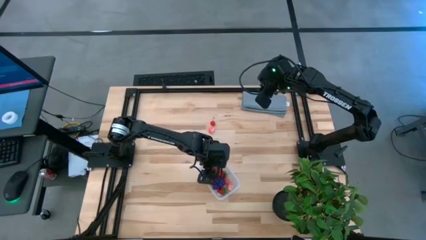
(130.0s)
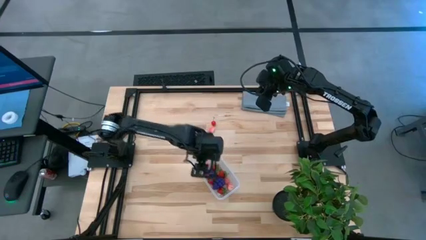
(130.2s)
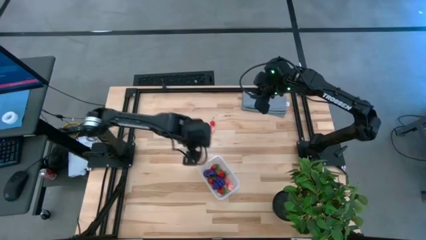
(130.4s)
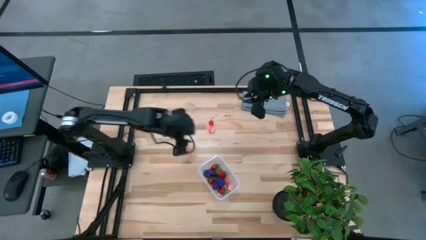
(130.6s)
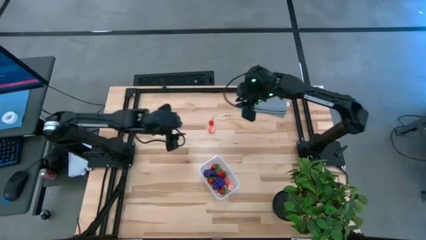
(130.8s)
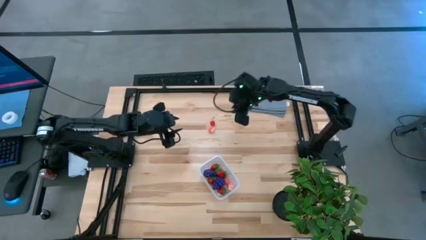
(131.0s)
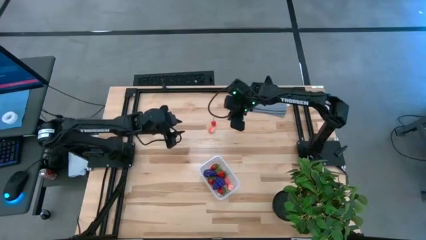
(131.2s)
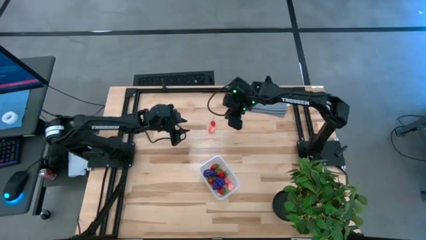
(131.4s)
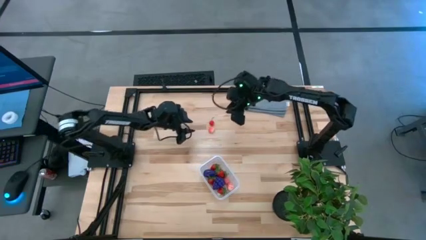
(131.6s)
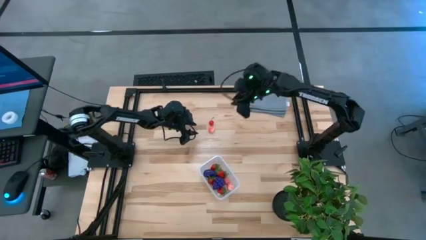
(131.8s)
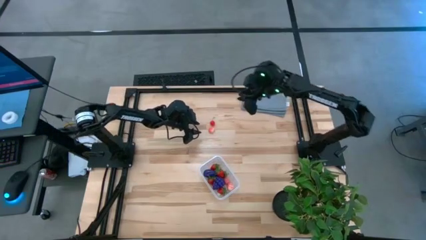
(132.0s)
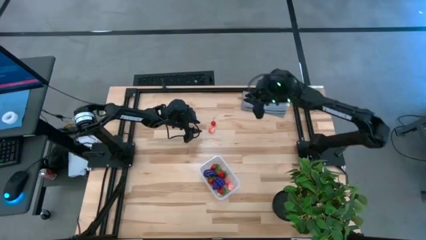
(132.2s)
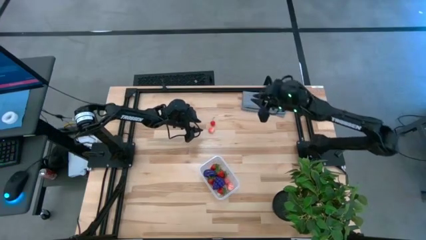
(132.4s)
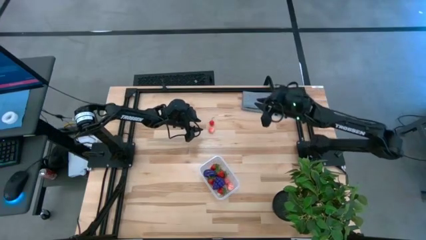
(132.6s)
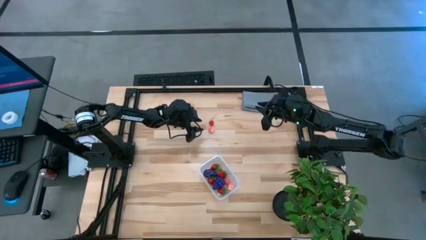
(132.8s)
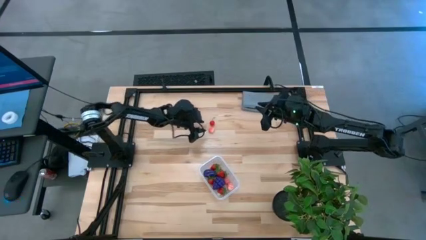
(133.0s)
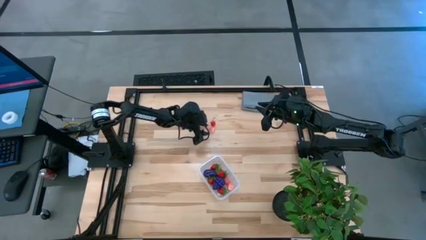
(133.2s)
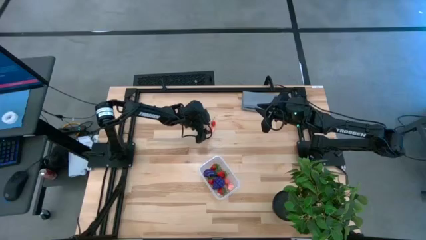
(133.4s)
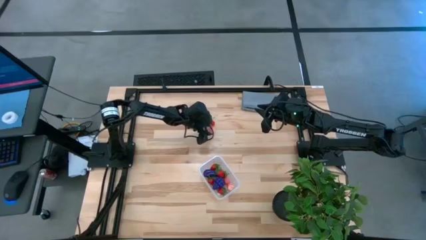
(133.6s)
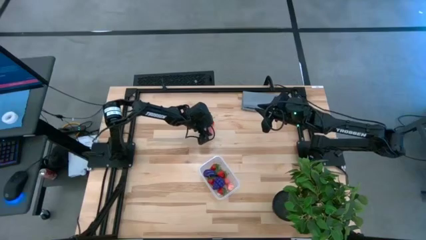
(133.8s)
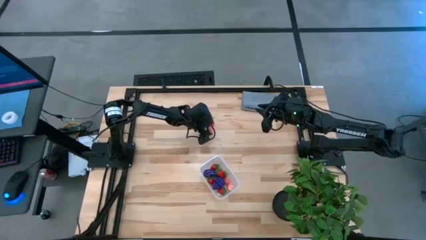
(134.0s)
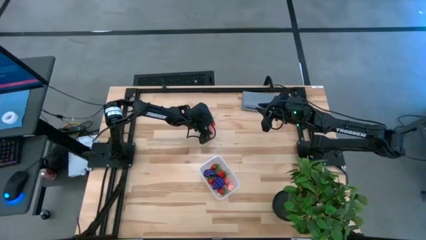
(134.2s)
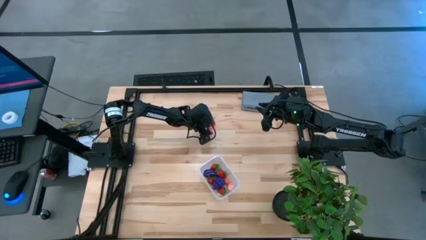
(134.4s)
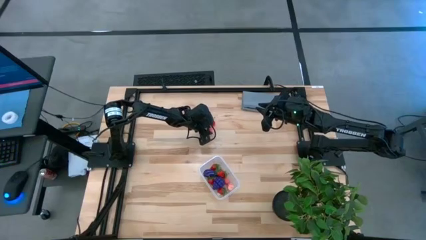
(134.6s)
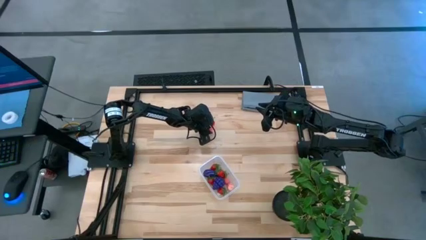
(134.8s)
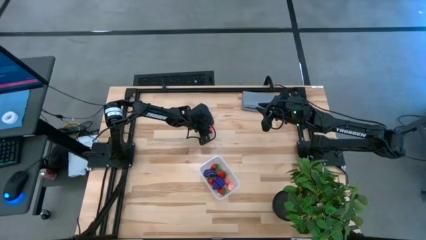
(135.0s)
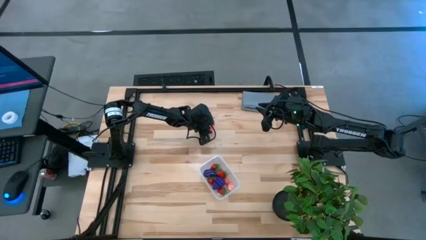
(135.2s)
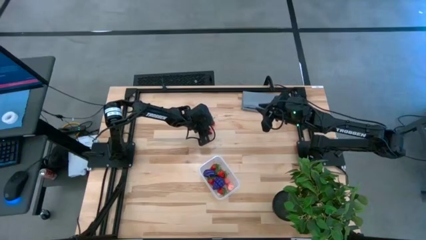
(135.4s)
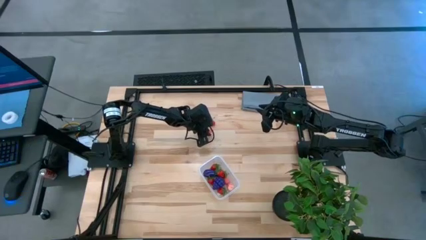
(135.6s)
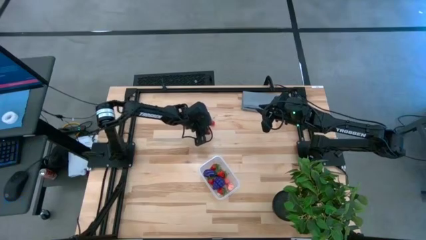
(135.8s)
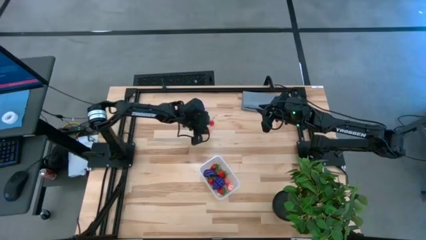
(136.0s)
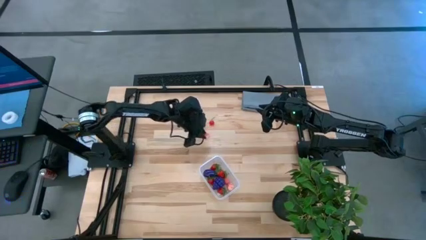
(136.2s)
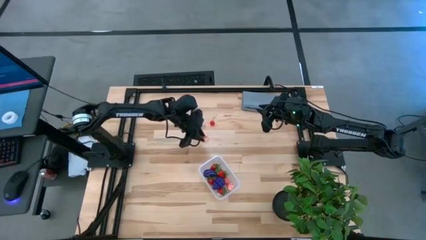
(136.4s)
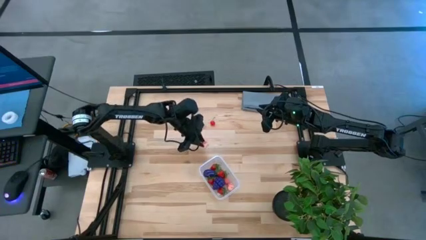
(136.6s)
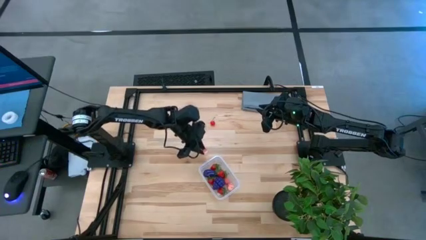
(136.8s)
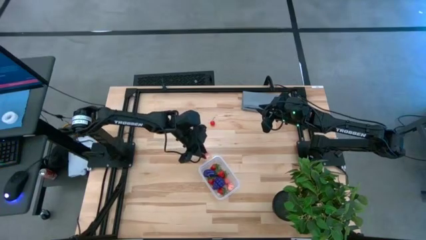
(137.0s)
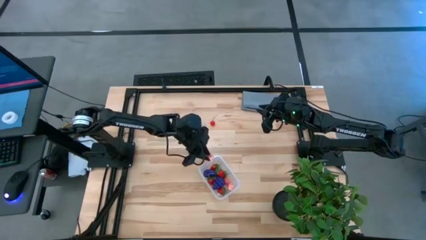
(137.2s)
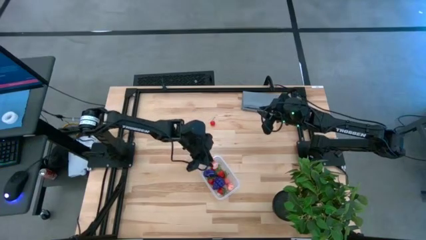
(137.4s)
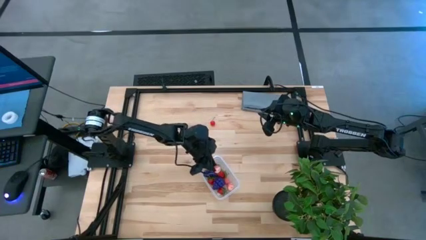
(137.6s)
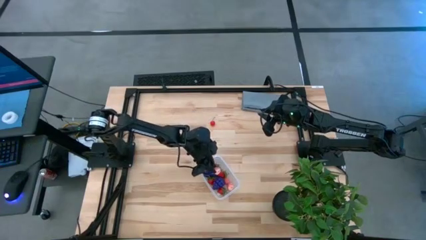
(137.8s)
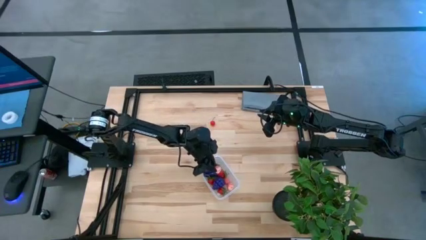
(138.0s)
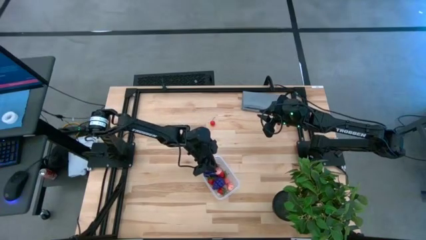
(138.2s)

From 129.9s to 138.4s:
Task: Pick and placing Produce into tupperware
Put the pink peach into the transparent bin

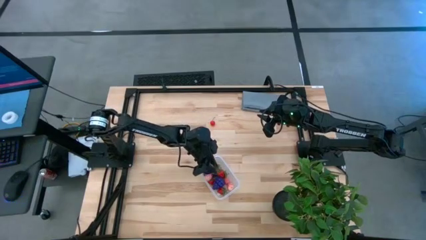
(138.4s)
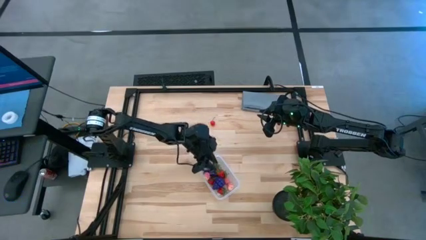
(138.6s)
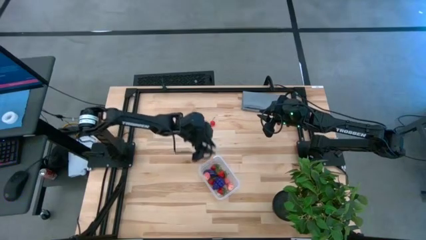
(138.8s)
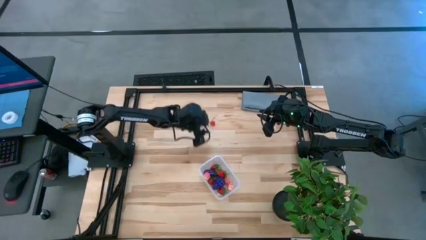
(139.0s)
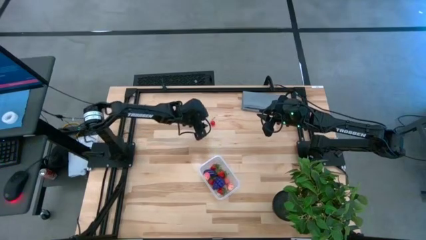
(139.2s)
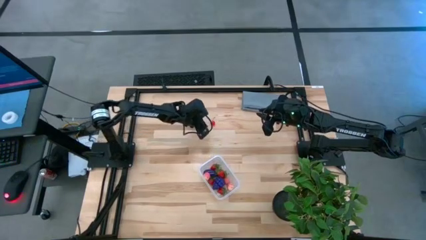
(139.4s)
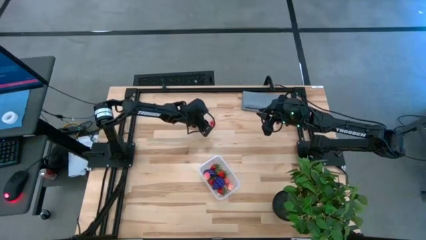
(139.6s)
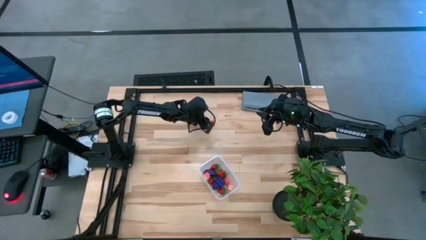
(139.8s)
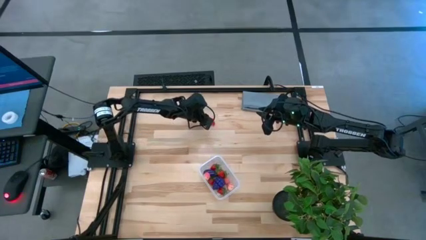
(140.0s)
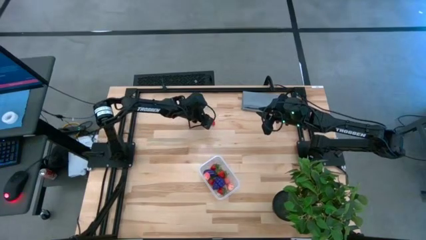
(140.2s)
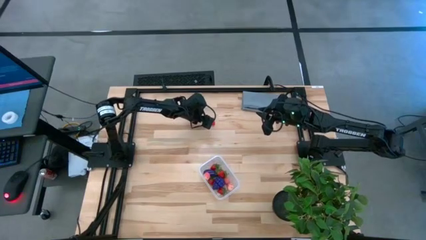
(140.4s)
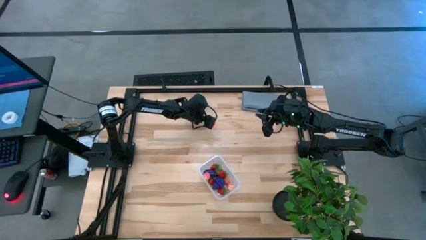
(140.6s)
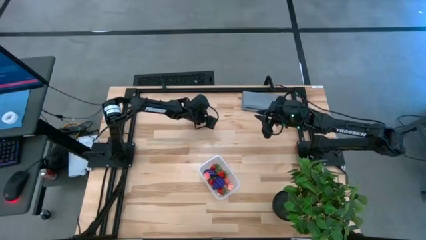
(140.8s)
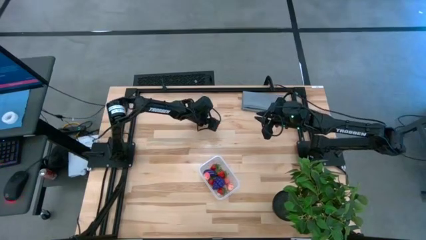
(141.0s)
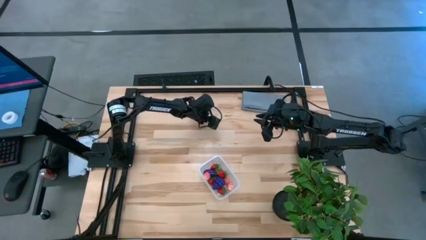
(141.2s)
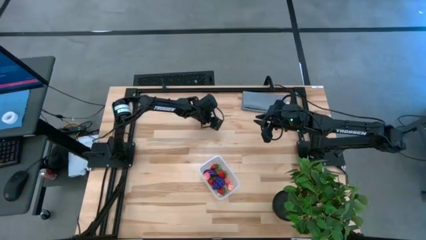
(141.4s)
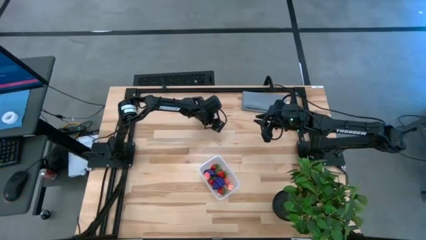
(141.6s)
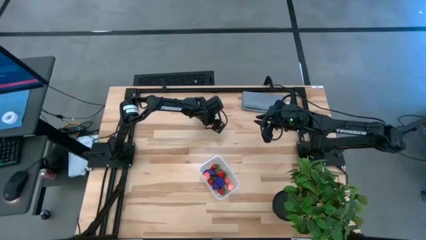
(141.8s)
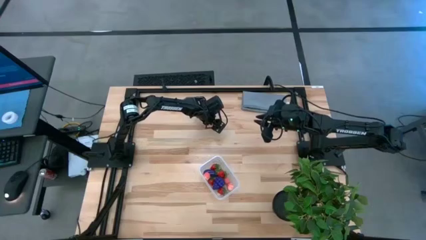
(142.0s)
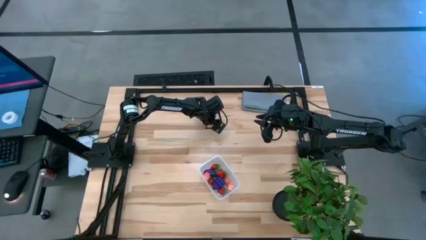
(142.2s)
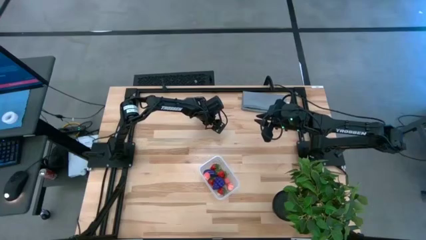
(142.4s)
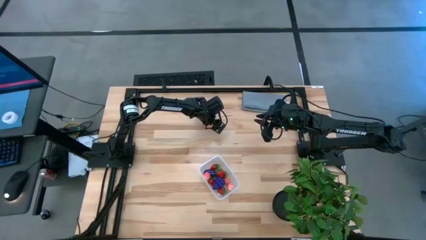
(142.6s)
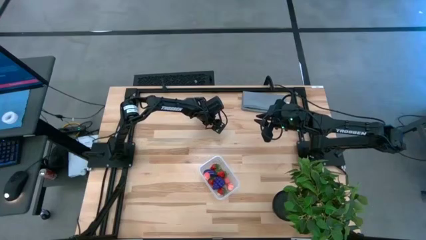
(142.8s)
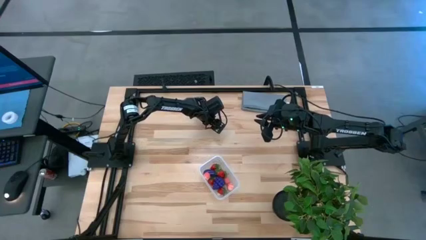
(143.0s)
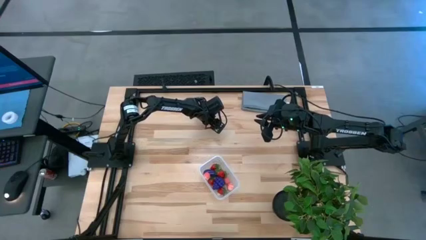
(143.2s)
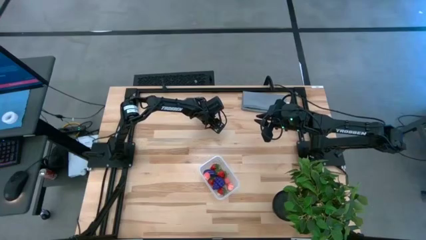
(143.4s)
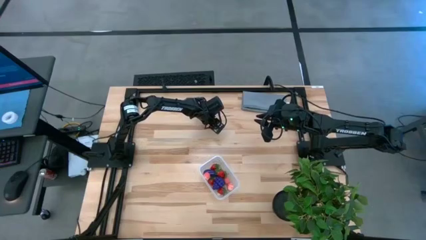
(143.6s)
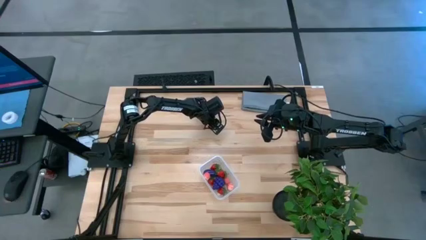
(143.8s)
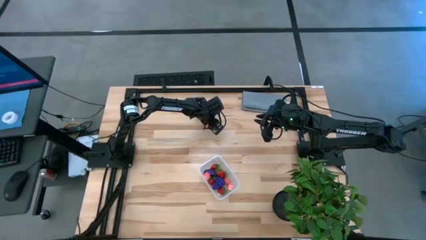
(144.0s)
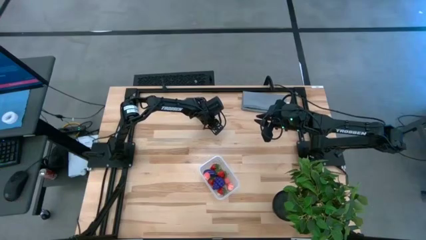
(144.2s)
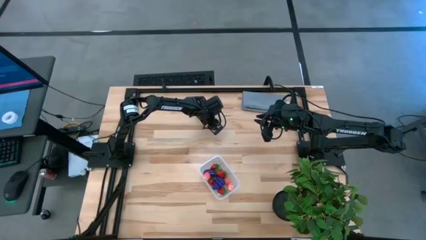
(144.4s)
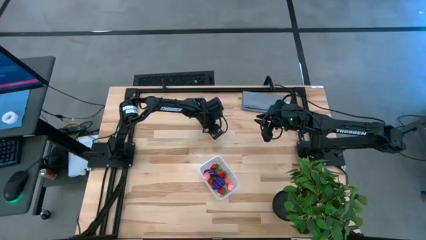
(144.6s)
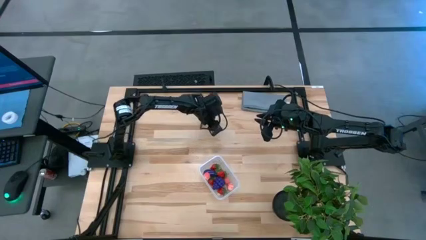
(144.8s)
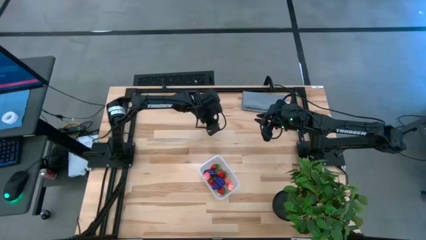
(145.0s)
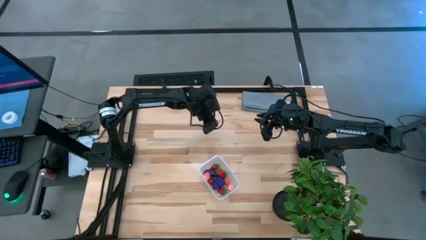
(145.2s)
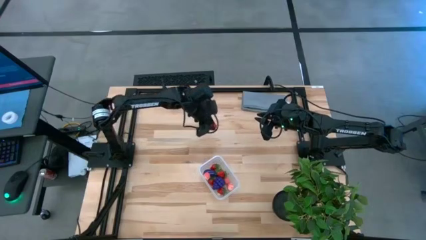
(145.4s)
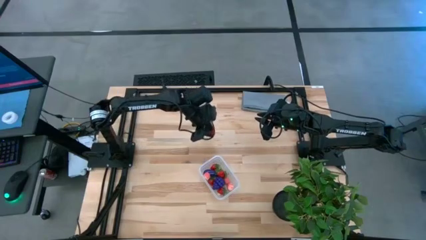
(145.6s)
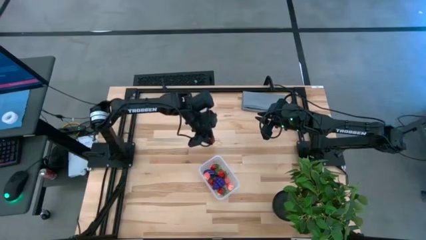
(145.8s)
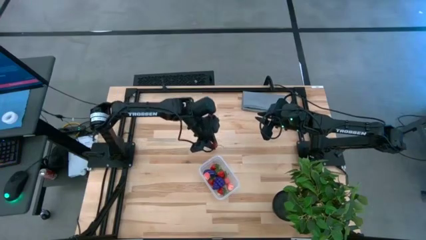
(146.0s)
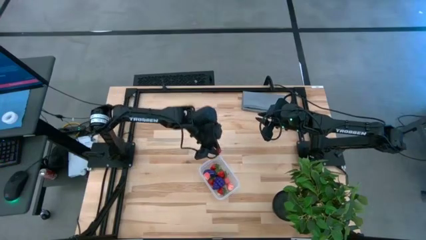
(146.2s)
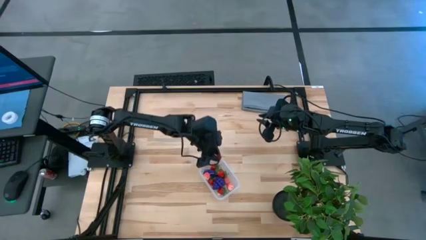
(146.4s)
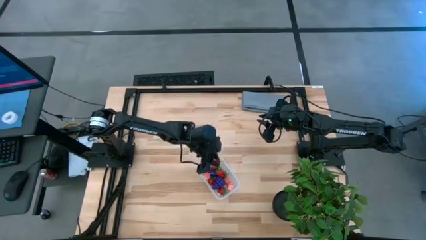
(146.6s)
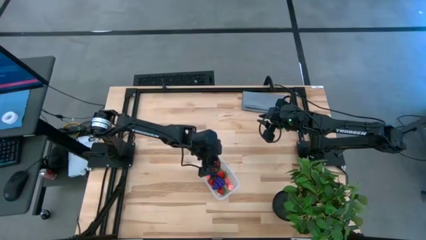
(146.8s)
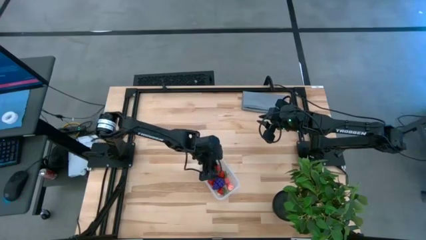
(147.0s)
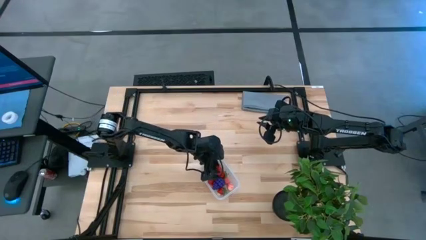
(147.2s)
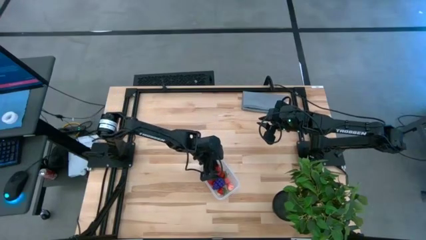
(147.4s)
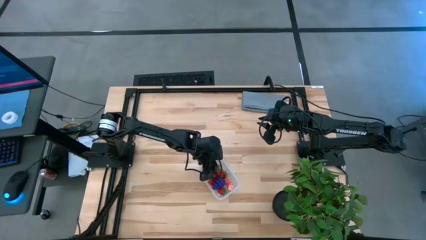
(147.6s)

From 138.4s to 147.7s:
Put the red cherry into the transparent bin
